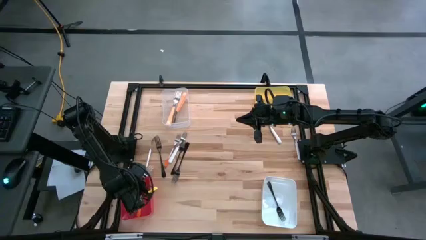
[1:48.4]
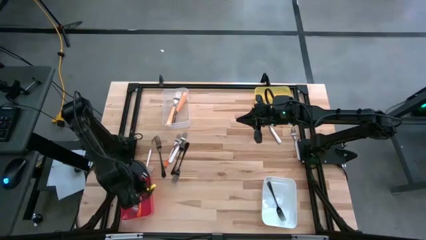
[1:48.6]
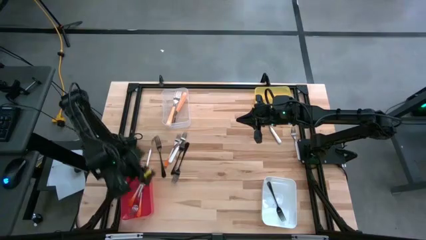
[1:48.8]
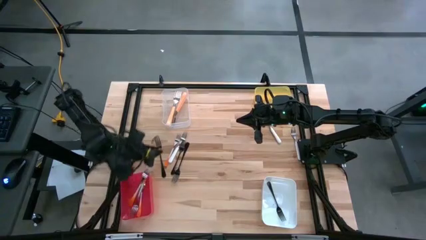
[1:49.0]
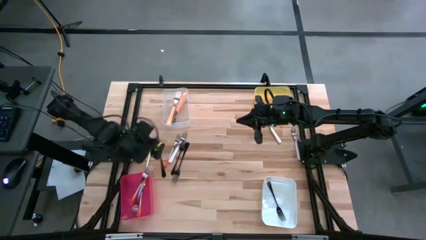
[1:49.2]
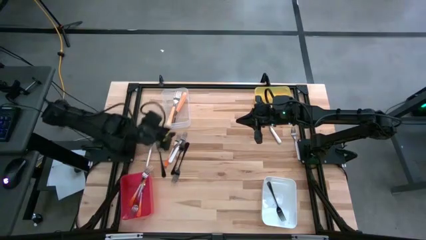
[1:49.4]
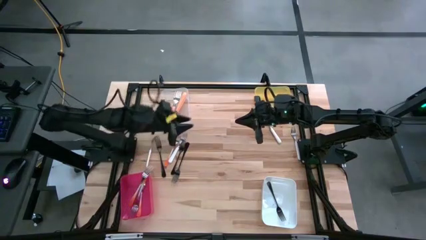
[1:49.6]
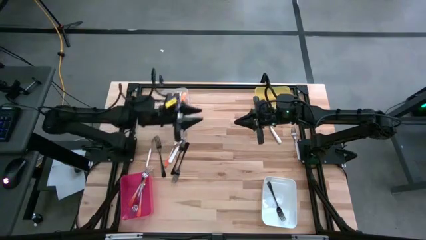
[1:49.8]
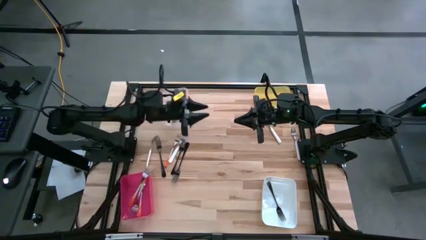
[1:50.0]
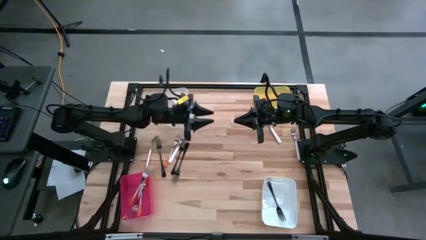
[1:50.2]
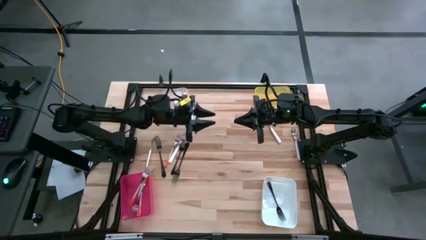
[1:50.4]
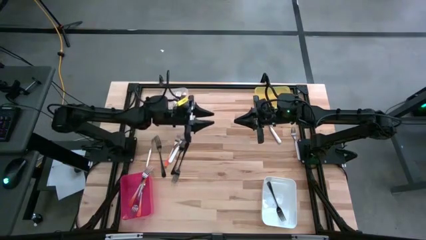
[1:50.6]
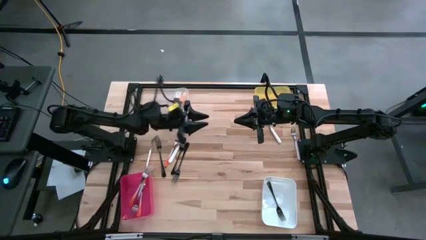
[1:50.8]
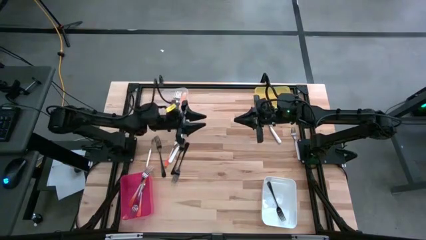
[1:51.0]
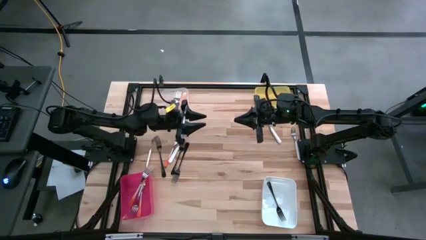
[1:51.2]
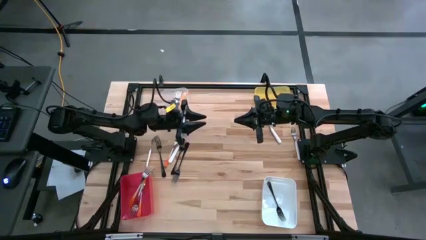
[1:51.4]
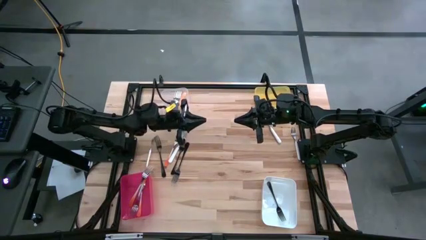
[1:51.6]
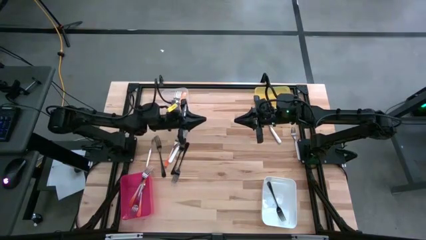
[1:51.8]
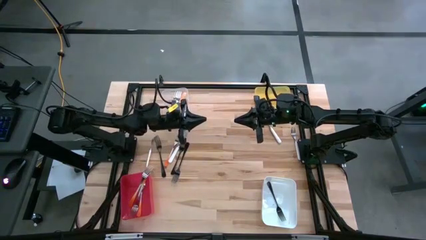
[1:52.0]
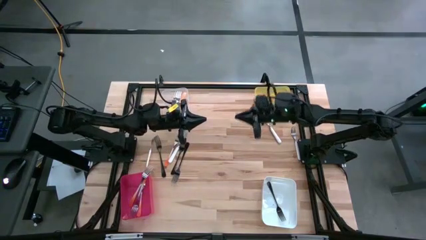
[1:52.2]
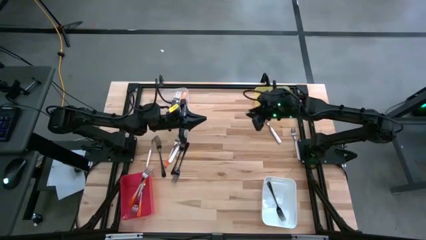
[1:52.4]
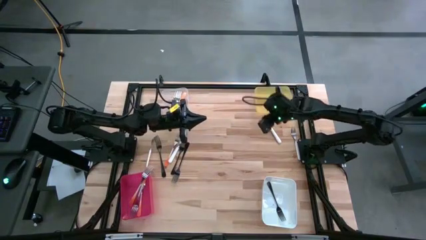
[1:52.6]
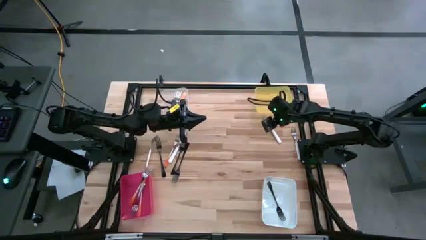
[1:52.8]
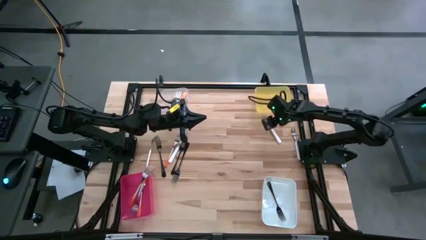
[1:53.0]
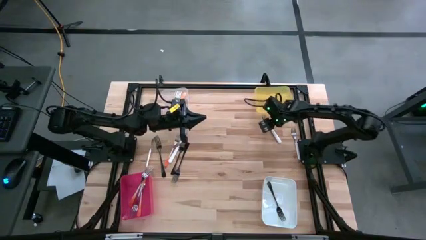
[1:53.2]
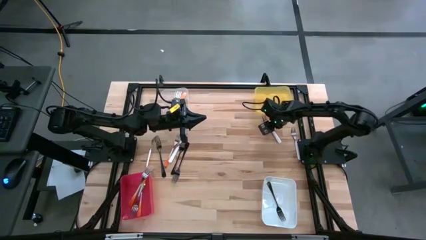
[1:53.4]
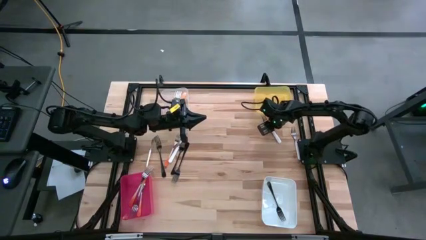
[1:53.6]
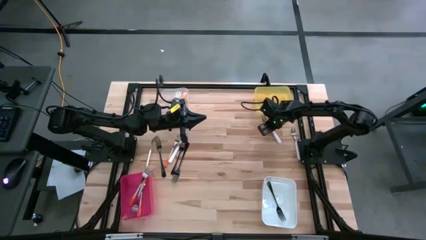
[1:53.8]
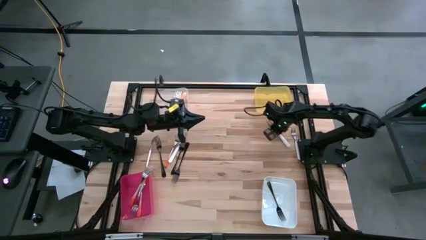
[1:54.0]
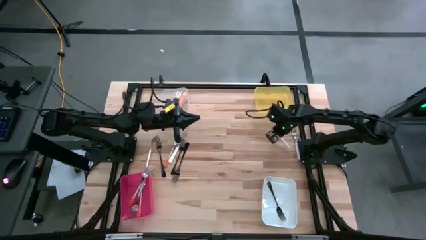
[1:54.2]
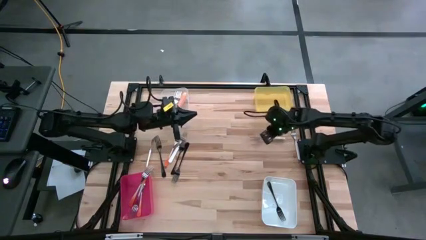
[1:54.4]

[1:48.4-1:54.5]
Task: Sort silverware by color (type)
Put the white fork into the yellow bin

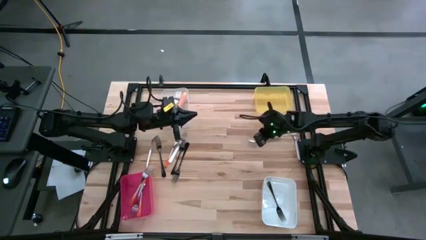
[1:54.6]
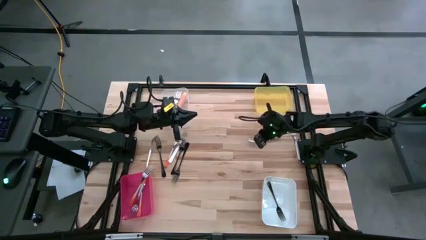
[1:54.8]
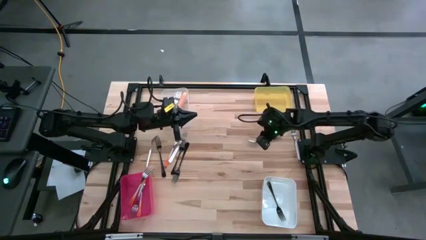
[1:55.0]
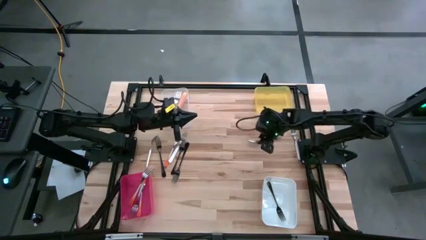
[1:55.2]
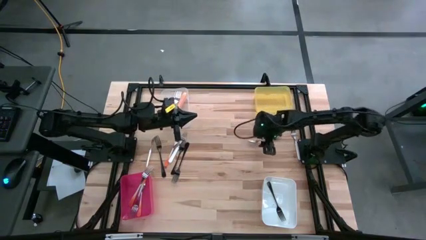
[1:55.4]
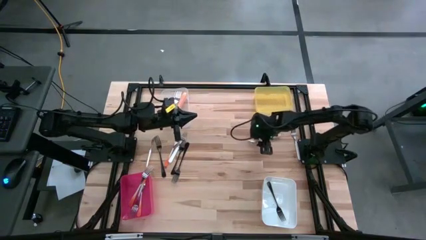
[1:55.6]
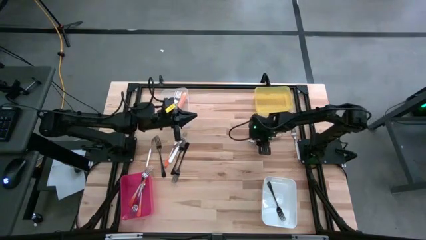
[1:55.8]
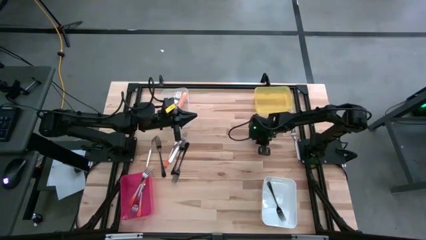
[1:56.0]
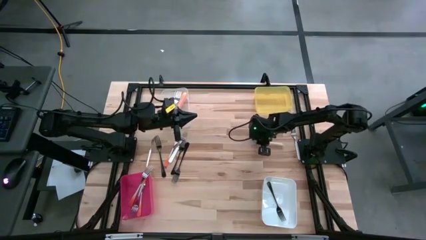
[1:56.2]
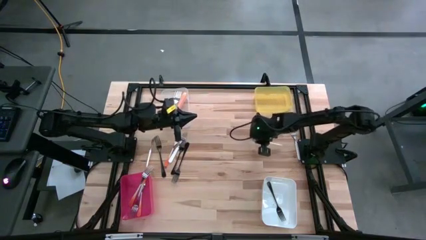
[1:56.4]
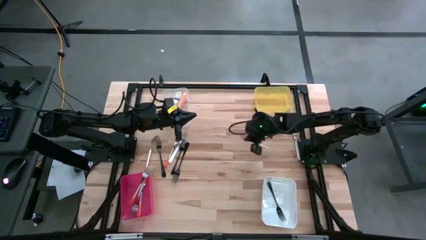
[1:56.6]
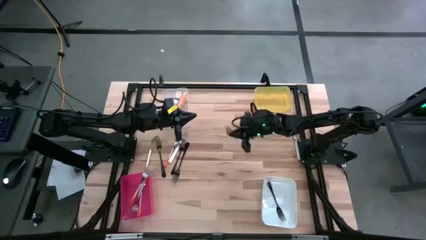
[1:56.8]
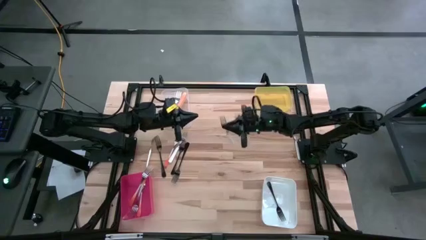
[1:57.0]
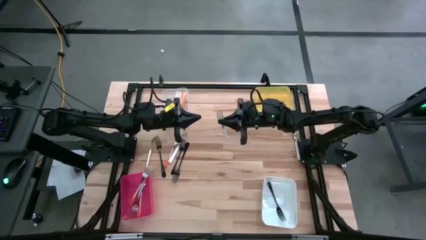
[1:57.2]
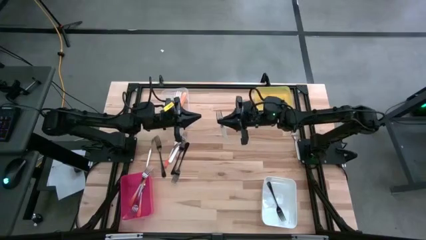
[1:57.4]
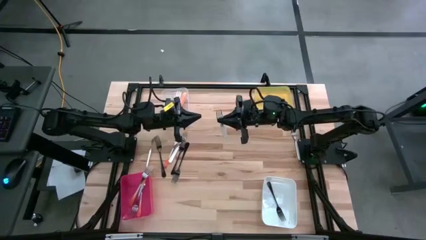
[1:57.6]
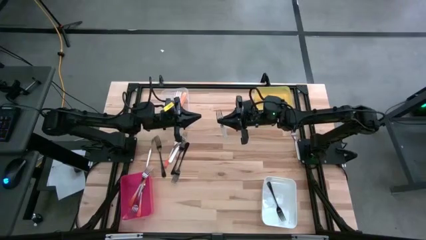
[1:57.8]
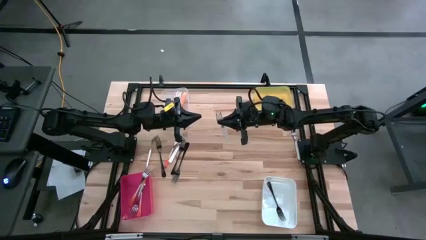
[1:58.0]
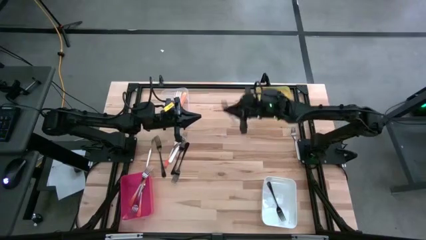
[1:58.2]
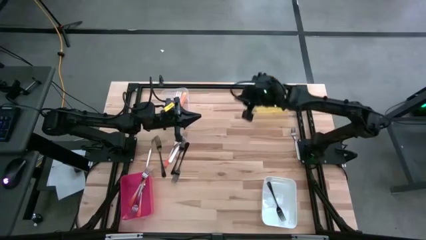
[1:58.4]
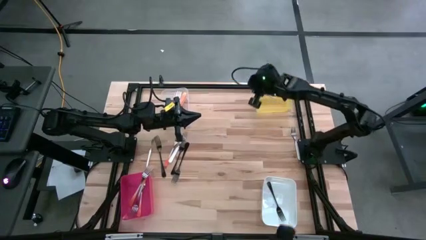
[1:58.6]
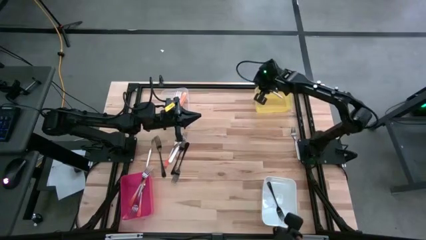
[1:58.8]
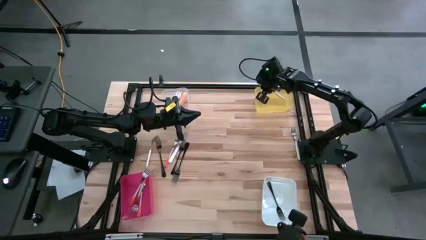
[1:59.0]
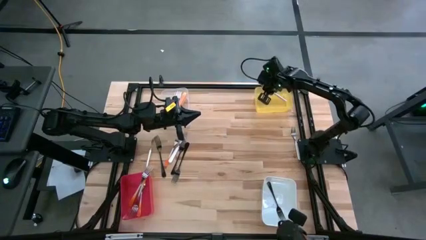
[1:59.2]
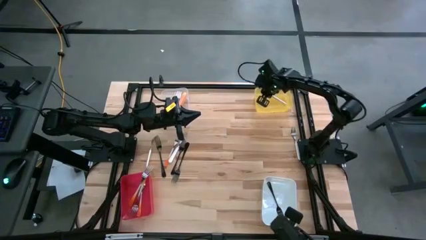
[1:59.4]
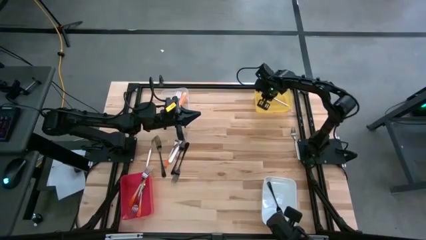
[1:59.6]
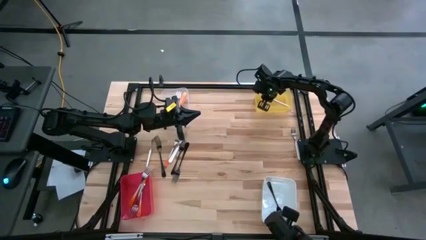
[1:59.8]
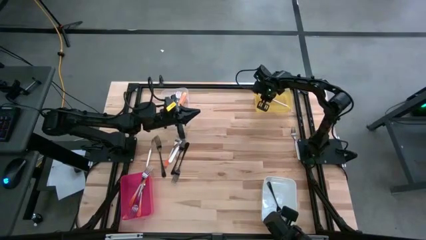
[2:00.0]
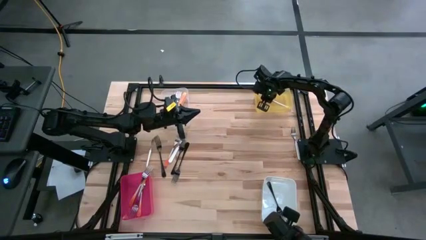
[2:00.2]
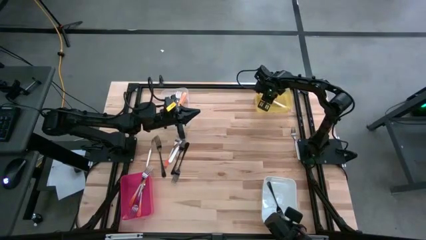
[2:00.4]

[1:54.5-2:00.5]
Put the white fork into the yellow bin

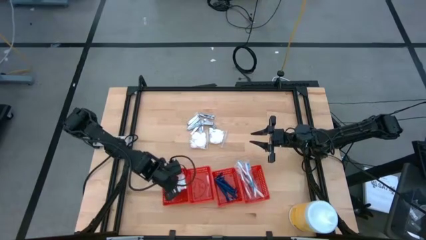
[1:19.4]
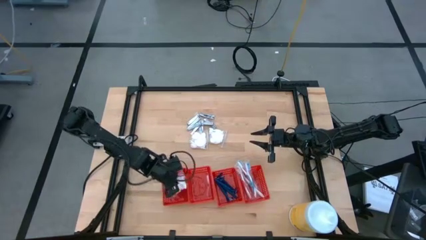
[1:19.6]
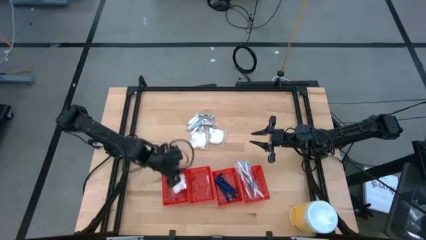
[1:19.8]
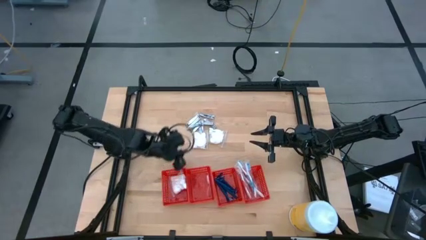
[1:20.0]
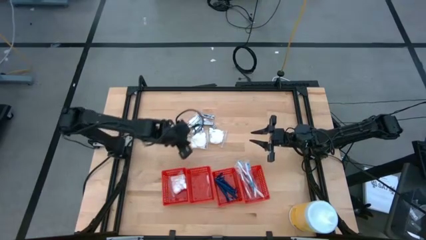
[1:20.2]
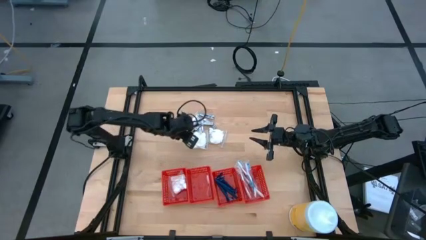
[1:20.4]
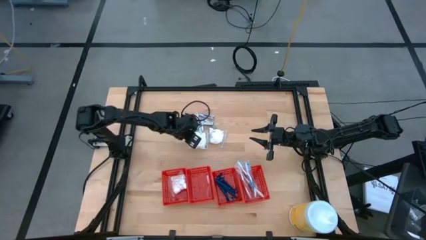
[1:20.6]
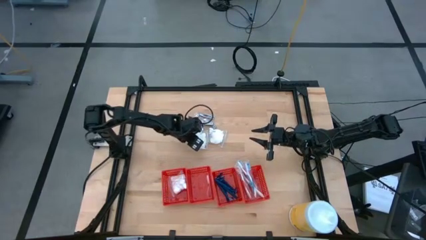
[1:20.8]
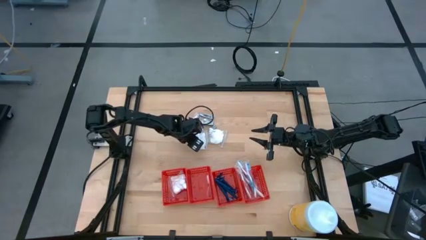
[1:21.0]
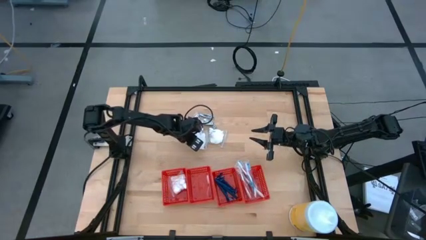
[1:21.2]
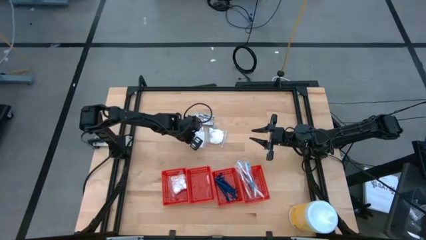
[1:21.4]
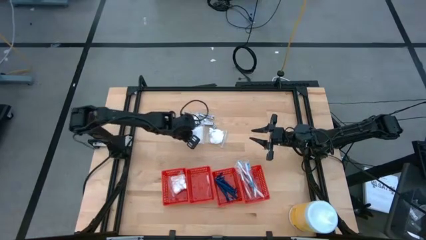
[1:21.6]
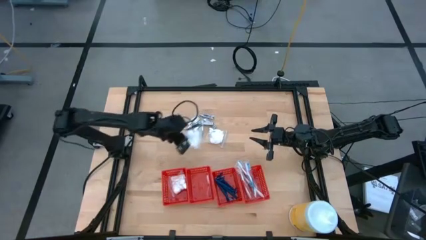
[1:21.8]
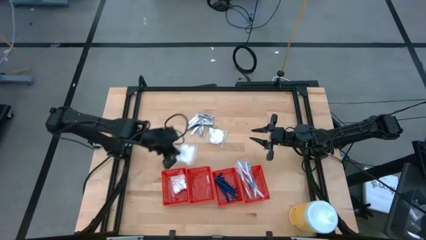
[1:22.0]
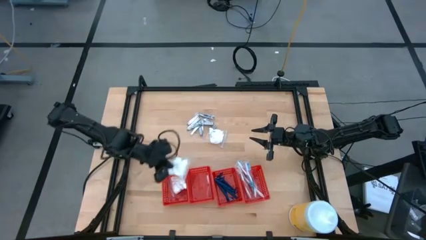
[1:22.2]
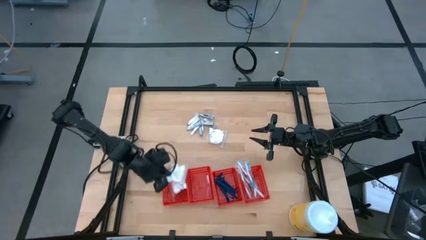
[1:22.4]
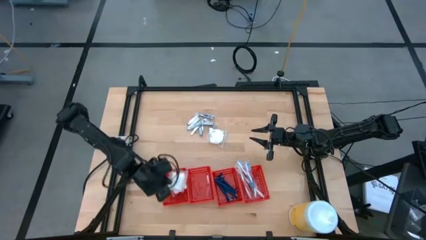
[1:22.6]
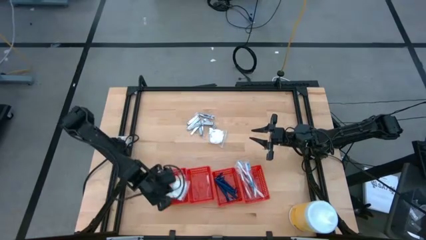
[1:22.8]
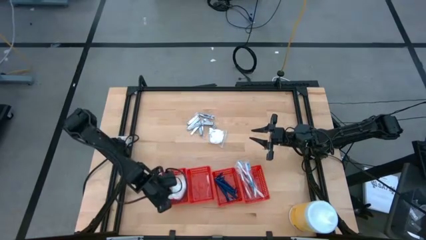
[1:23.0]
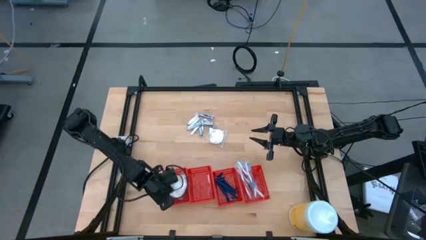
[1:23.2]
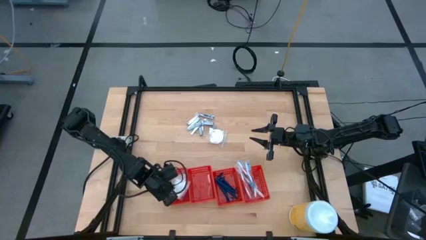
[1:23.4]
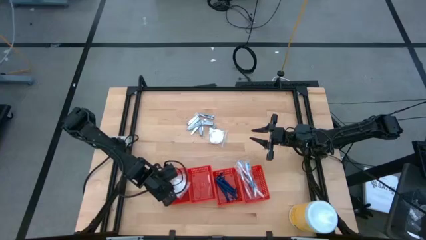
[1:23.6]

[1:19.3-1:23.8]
Task: Pick & Place Travel size toiletries
Put the white cotton packs into the left red bin
